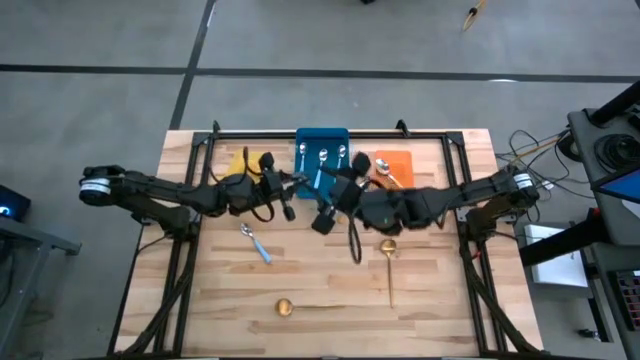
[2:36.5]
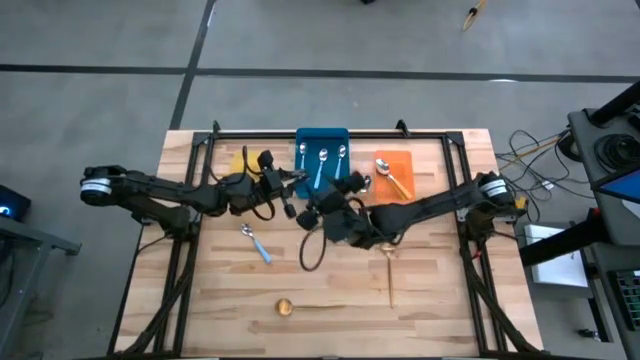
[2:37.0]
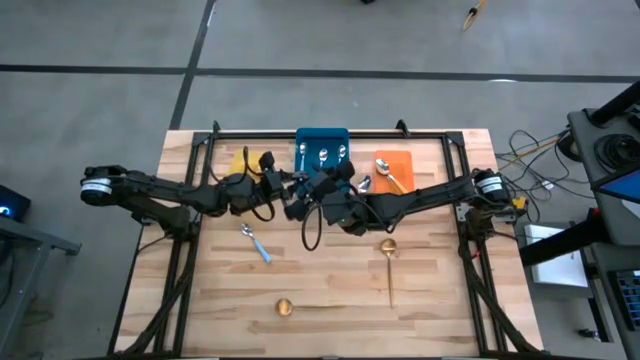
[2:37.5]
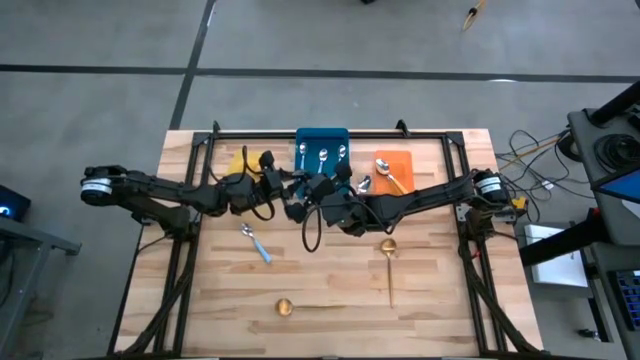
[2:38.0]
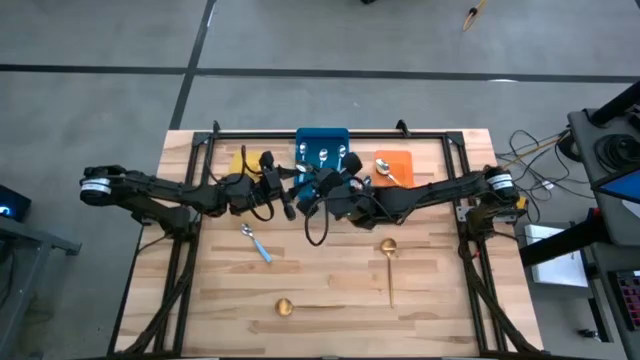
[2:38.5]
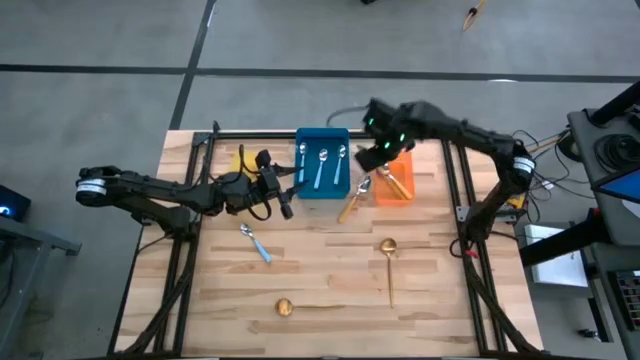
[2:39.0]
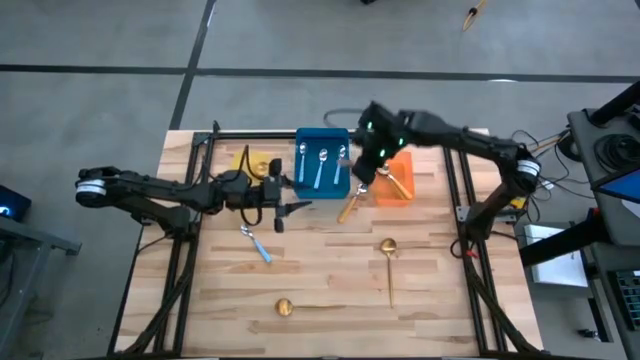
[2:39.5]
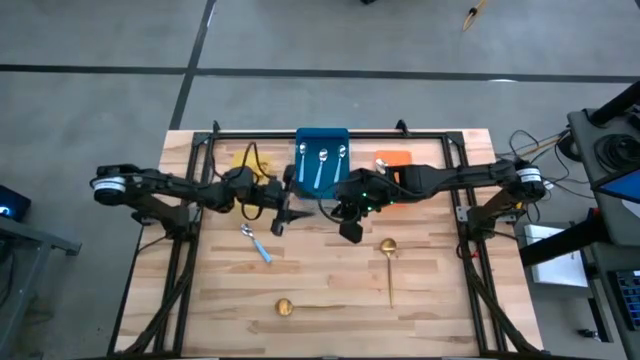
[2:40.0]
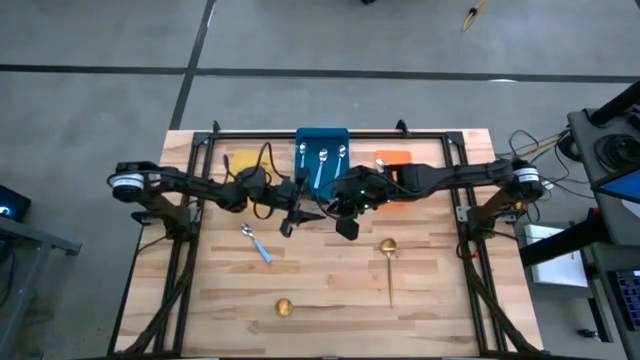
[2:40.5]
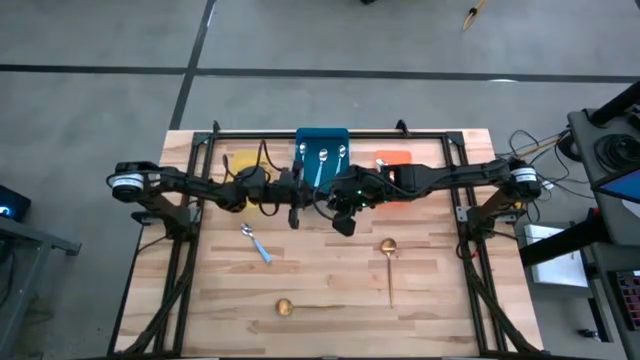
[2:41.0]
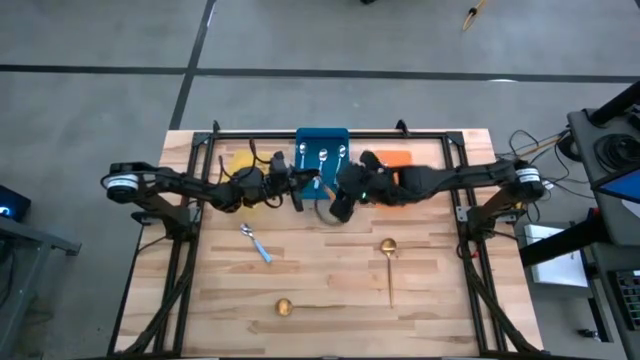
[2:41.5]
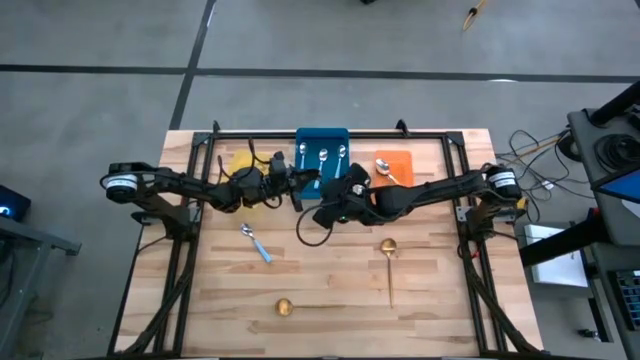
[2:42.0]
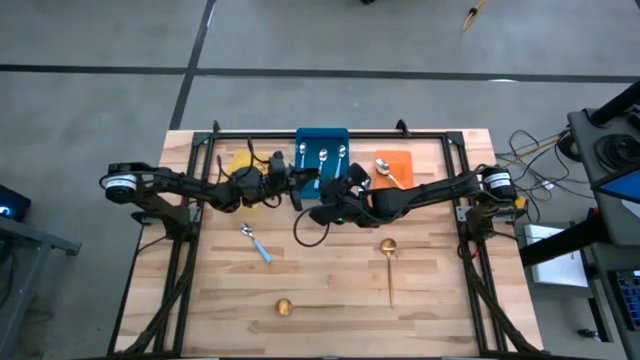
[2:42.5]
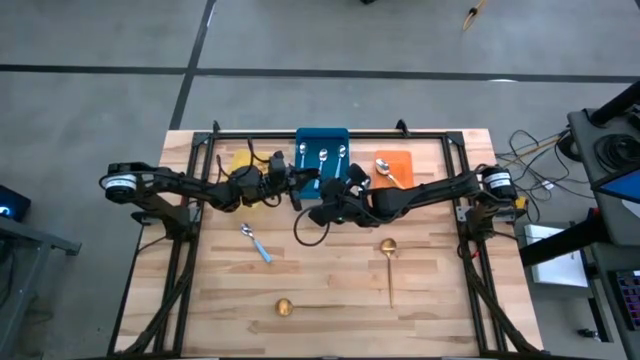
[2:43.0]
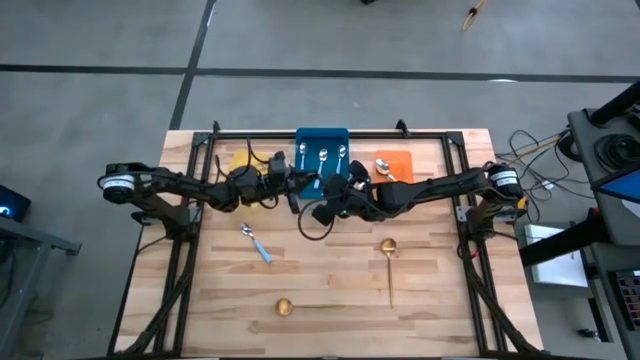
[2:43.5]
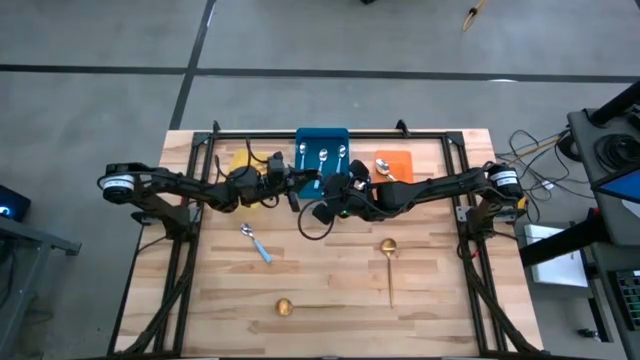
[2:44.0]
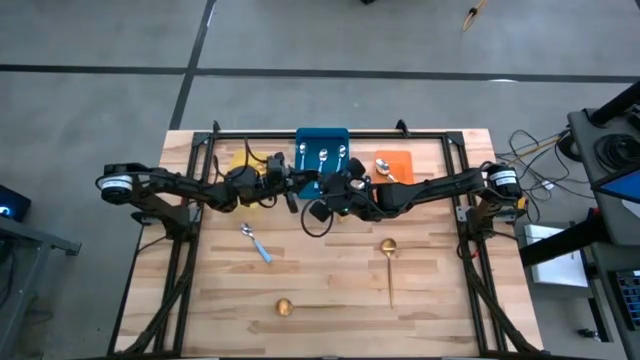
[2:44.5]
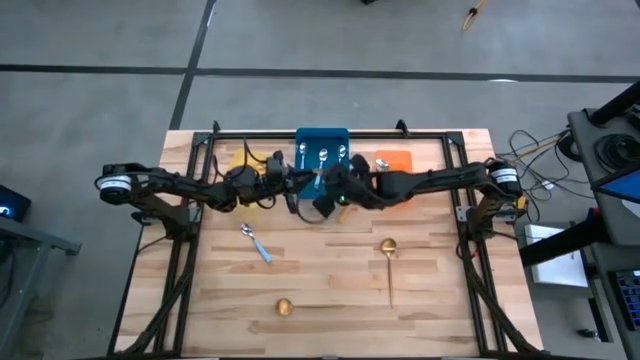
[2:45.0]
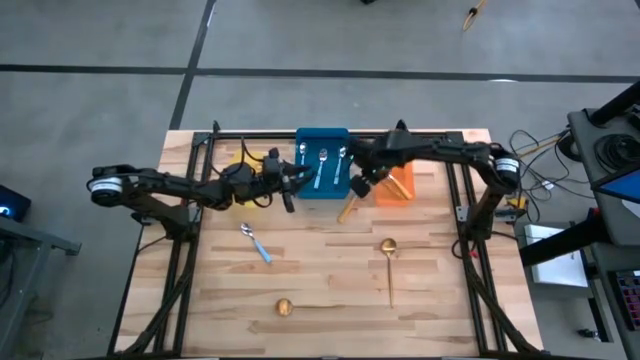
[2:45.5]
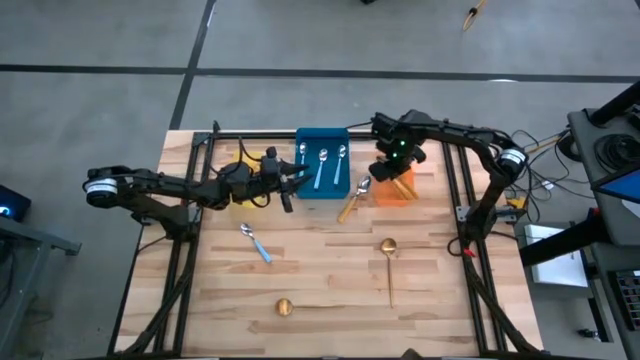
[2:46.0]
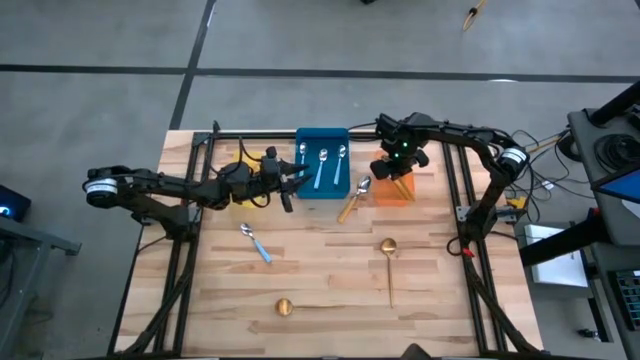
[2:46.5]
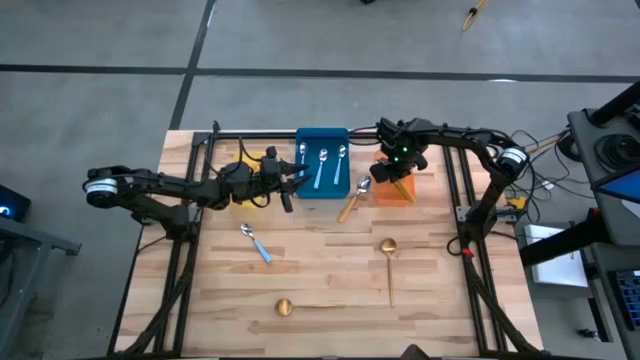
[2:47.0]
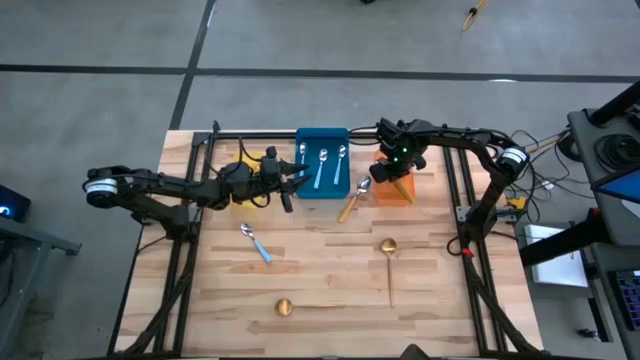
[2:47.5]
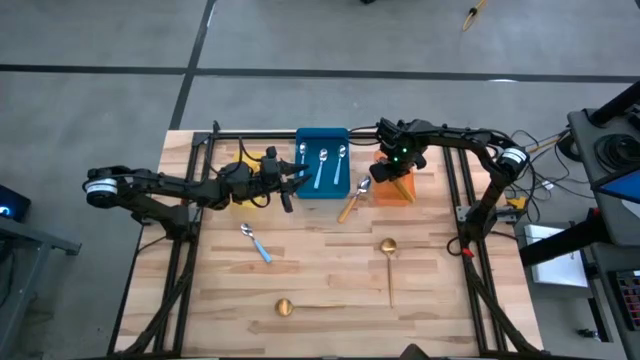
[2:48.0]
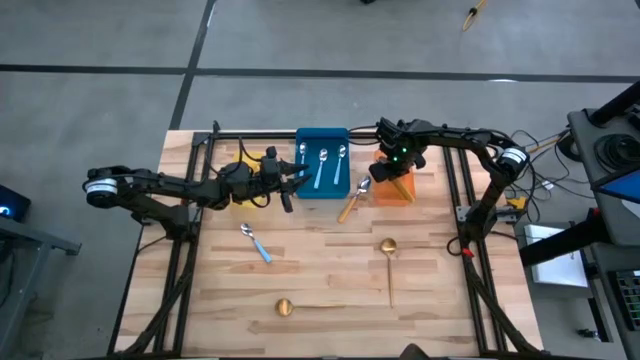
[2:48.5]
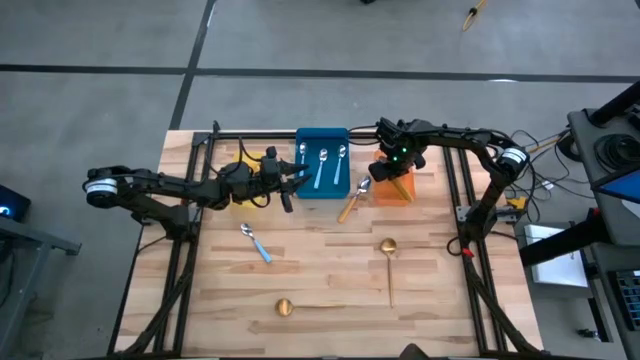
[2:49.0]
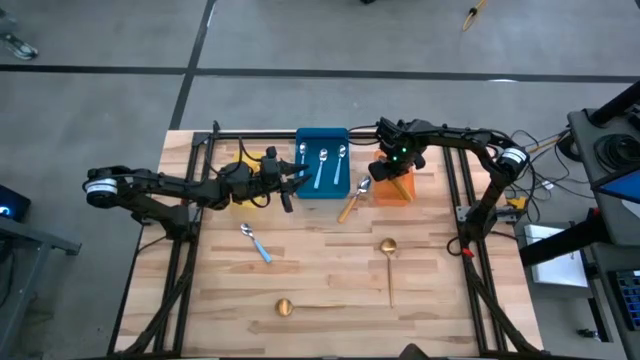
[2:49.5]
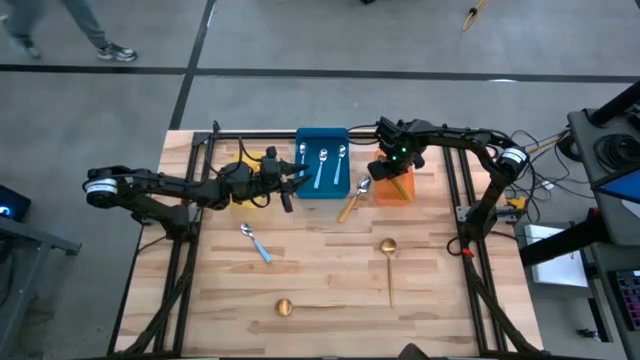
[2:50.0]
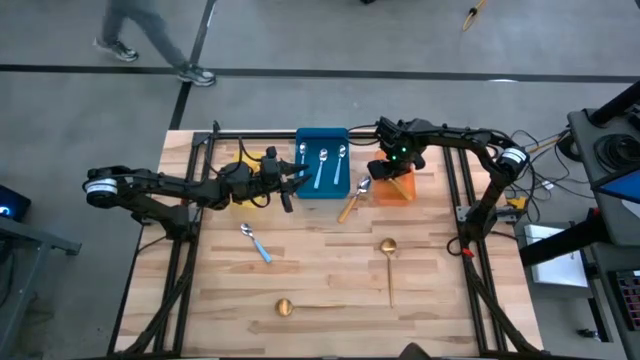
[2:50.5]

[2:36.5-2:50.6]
Task: Sort silverware by color (type)
Put the yellow spoon into the orange bin

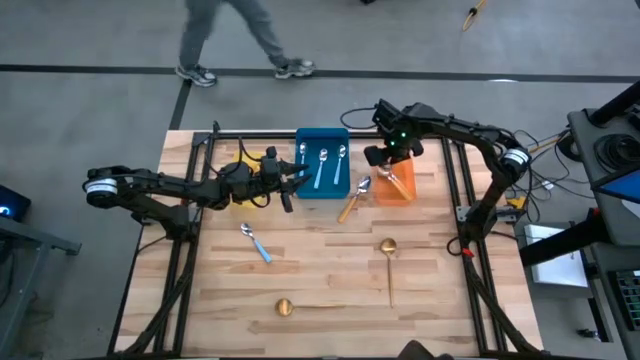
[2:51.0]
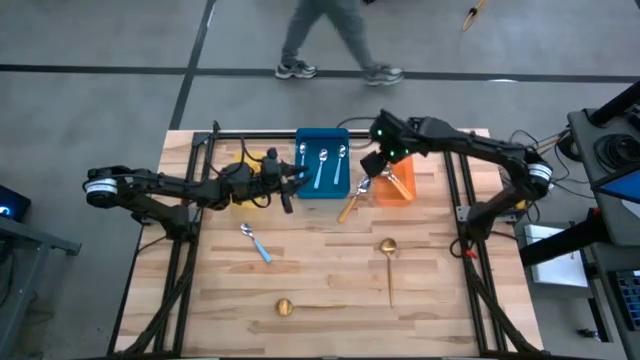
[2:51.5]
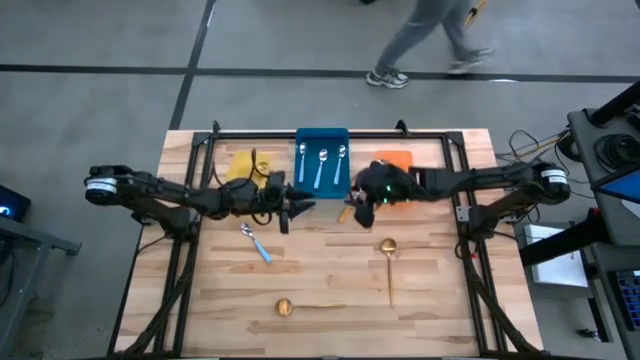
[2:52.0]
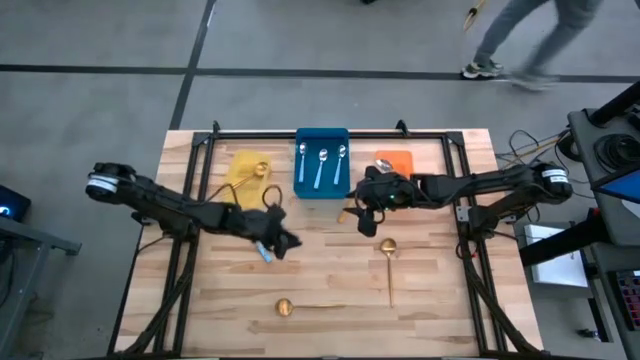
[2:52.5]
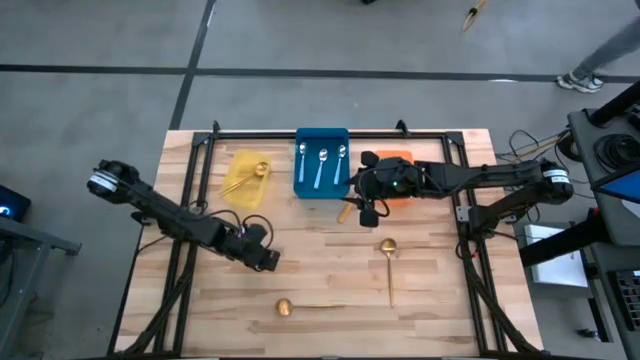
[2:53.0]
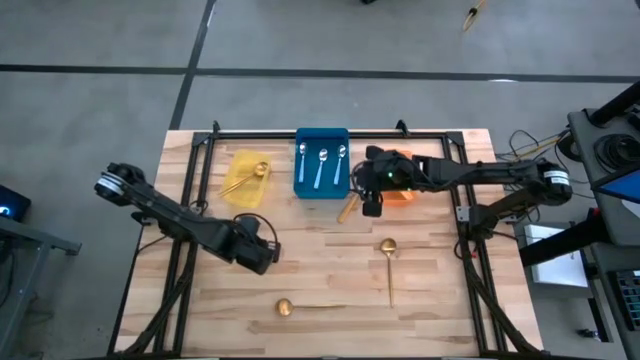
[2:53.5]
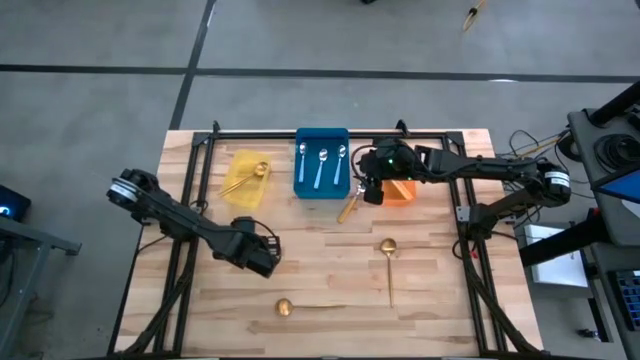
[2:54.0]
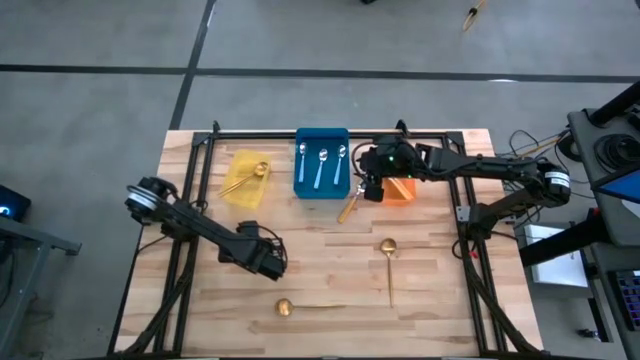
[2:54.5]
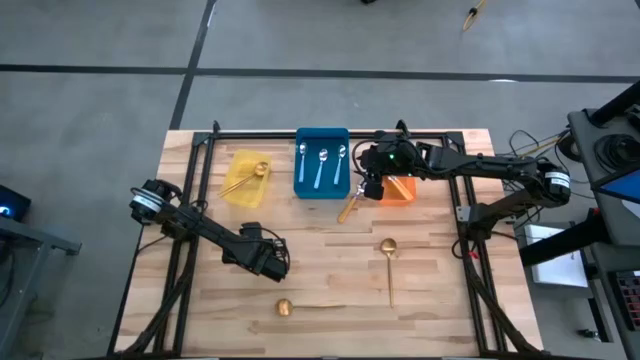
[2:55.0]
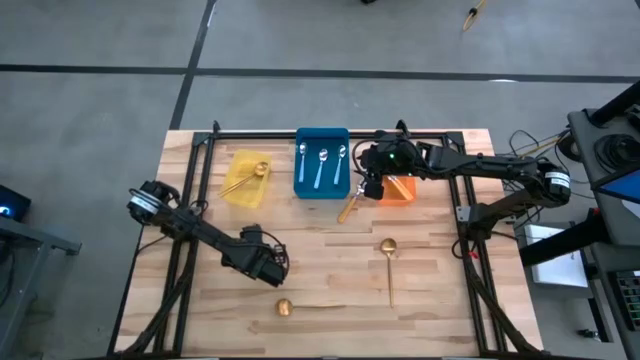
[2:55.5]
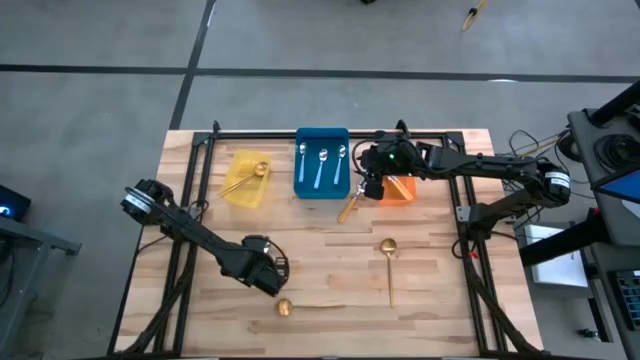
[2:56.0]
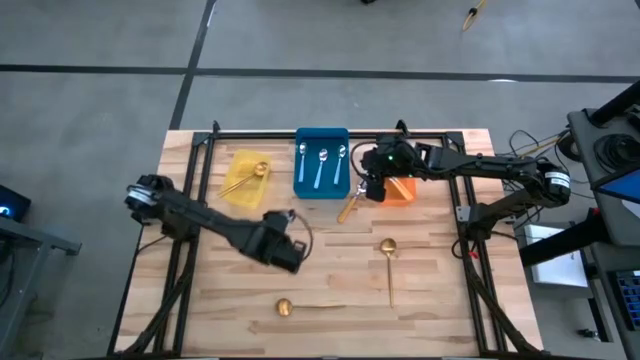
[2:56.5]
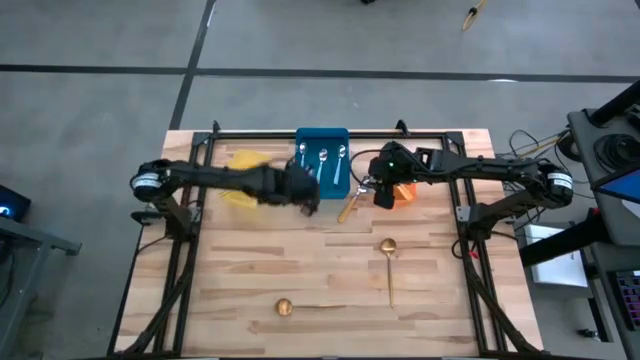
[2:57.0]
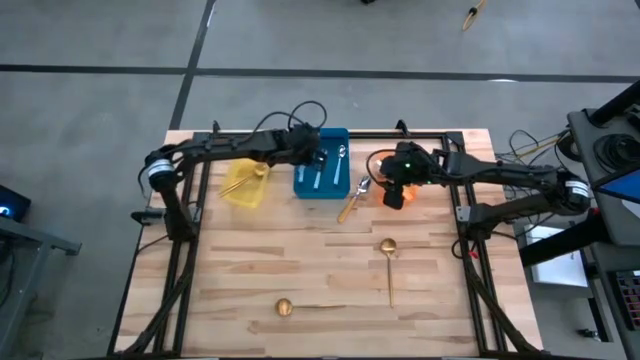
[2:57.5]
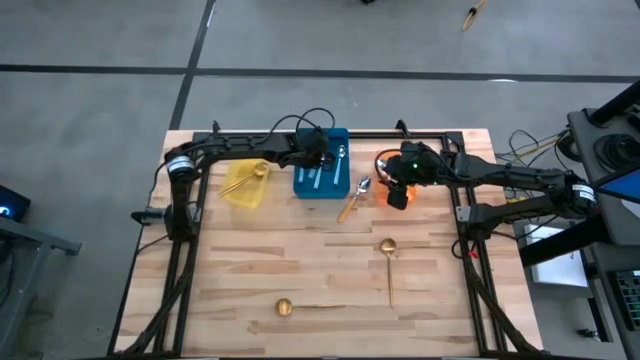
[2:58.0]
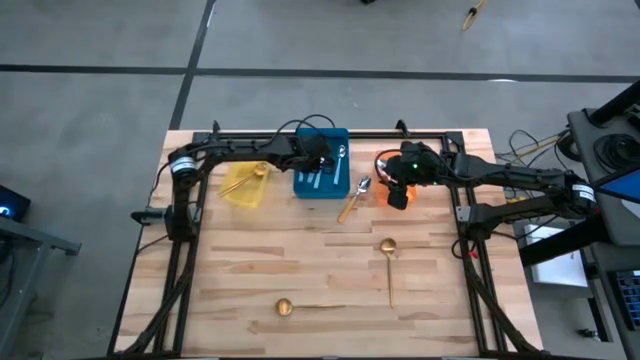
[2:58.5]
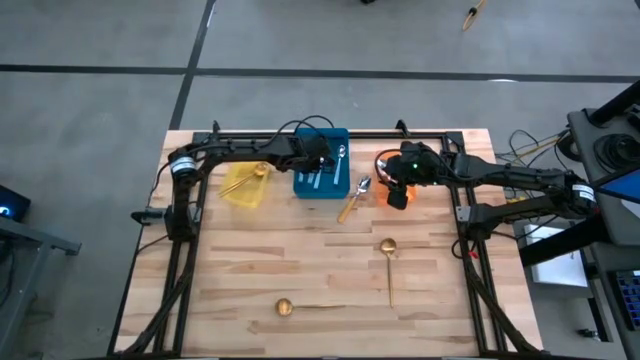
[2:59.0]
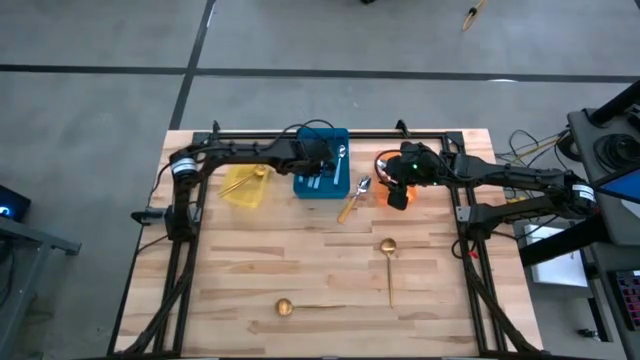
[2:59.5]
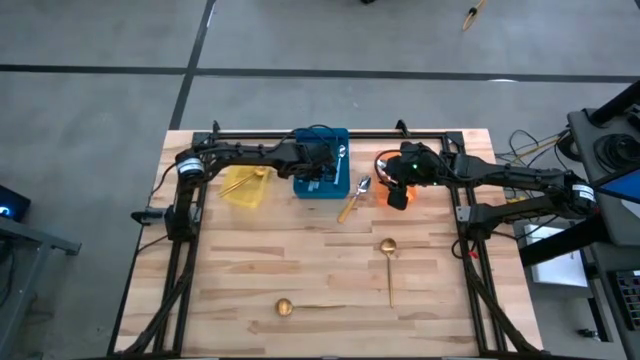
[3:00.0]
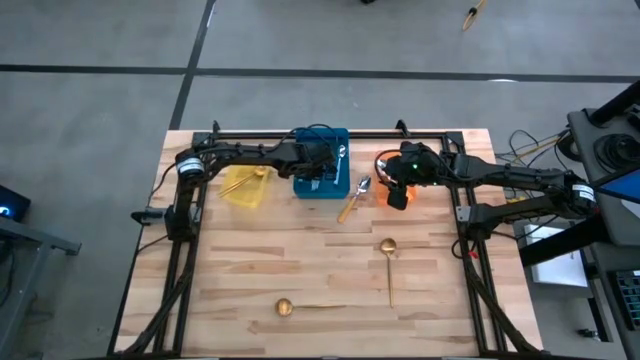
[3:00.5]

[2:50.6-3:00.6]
Put the blue spoon into the blue bin
